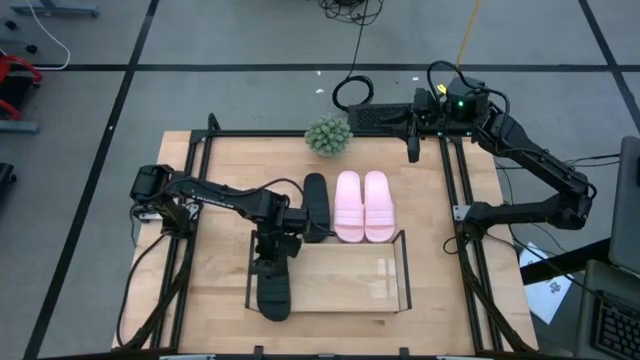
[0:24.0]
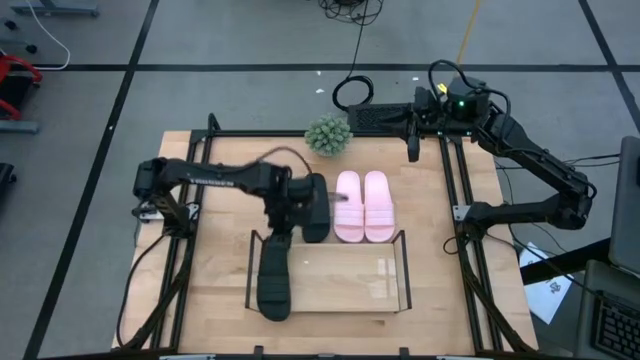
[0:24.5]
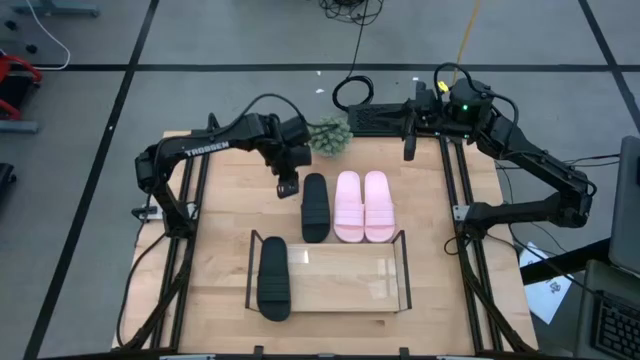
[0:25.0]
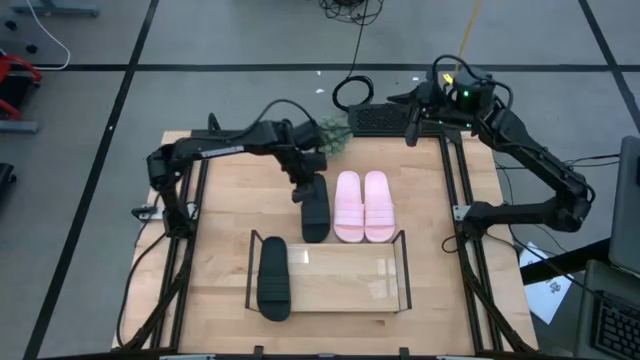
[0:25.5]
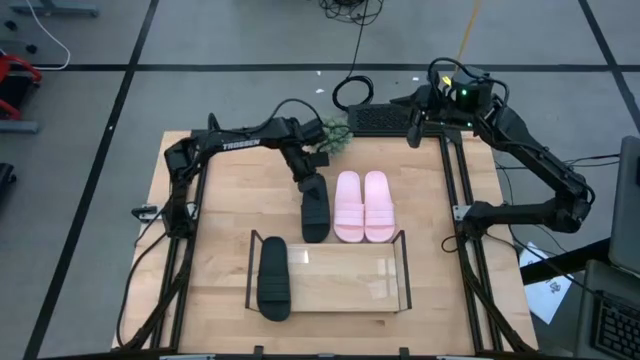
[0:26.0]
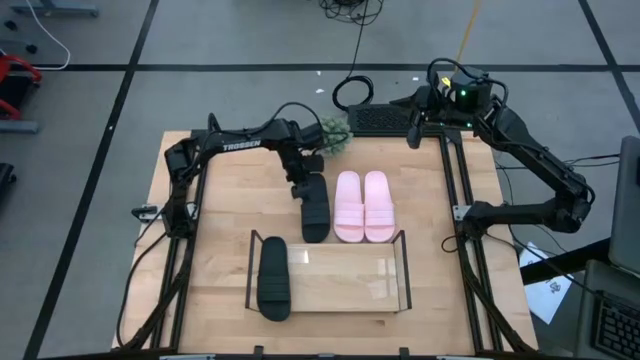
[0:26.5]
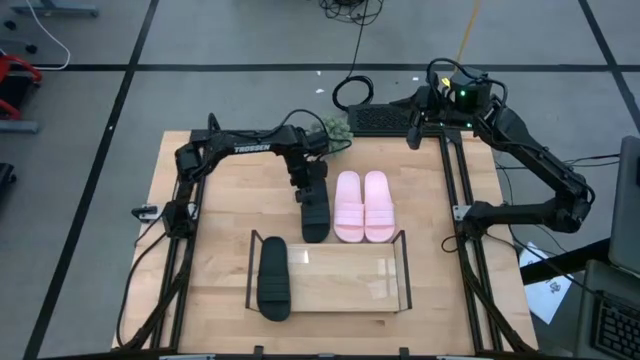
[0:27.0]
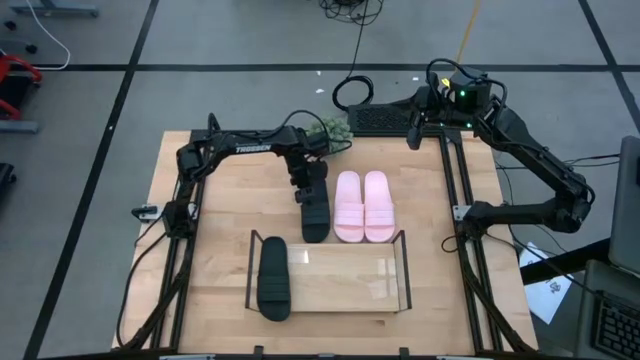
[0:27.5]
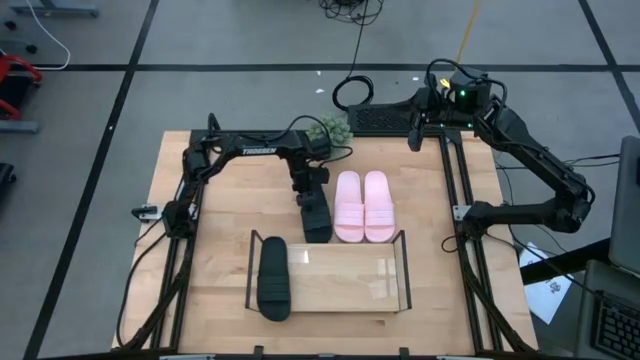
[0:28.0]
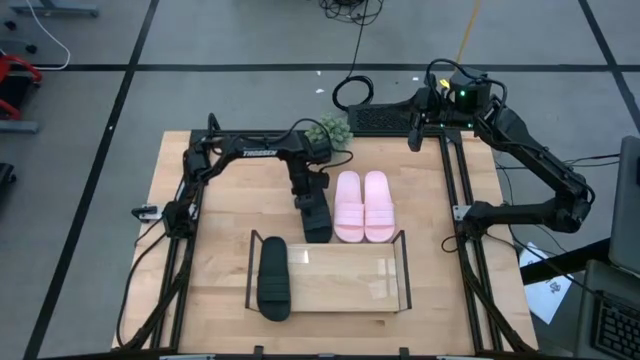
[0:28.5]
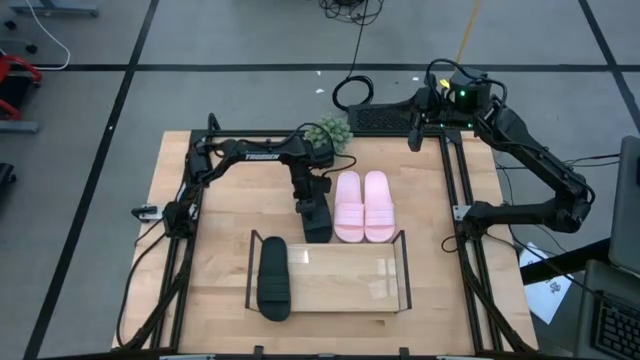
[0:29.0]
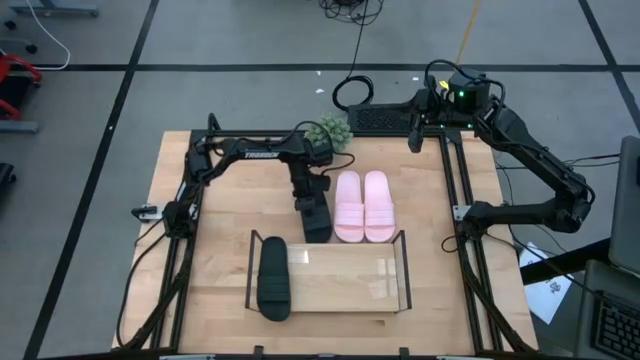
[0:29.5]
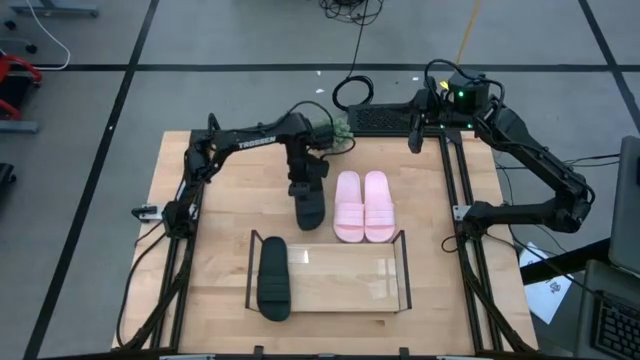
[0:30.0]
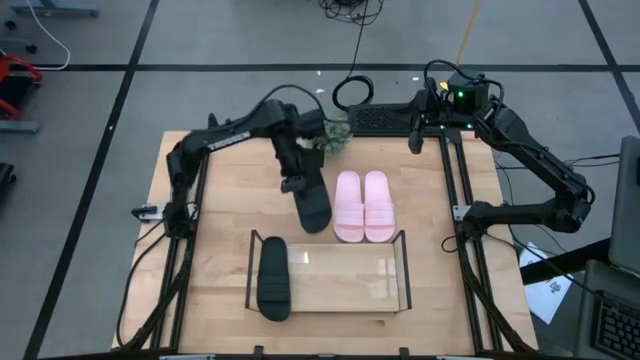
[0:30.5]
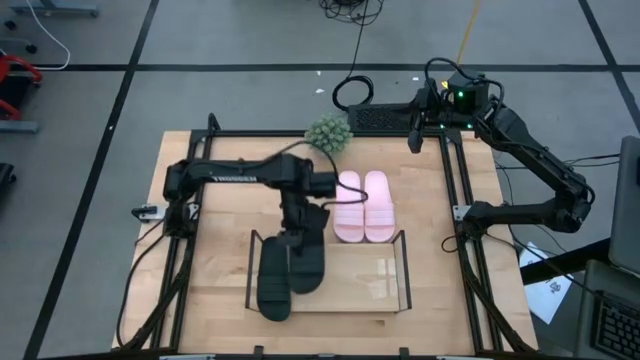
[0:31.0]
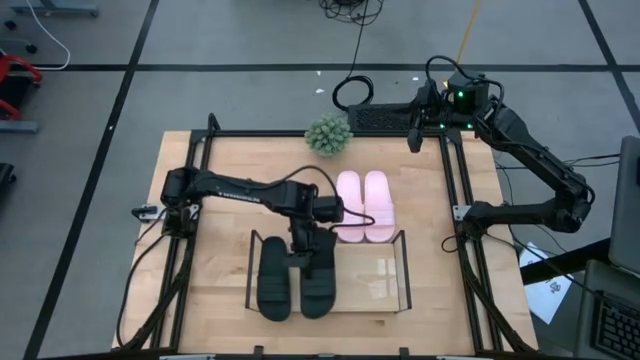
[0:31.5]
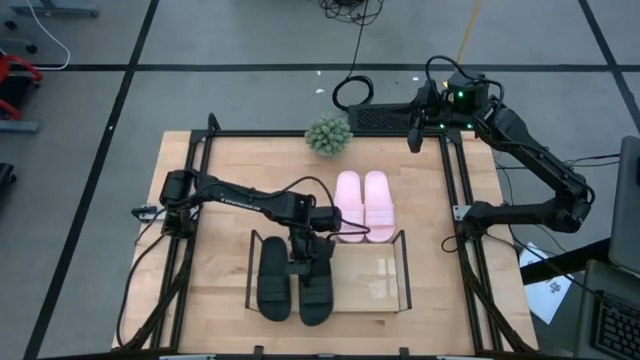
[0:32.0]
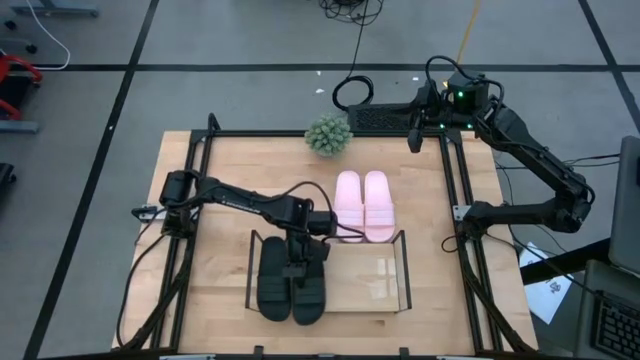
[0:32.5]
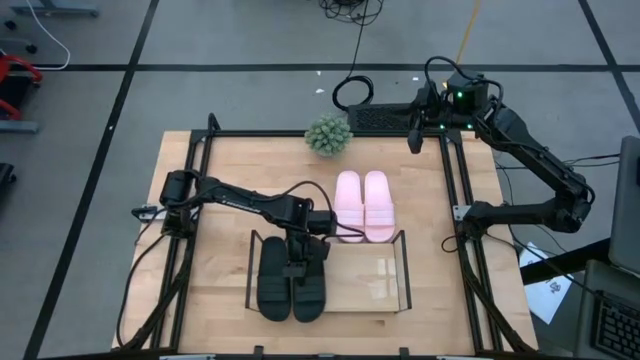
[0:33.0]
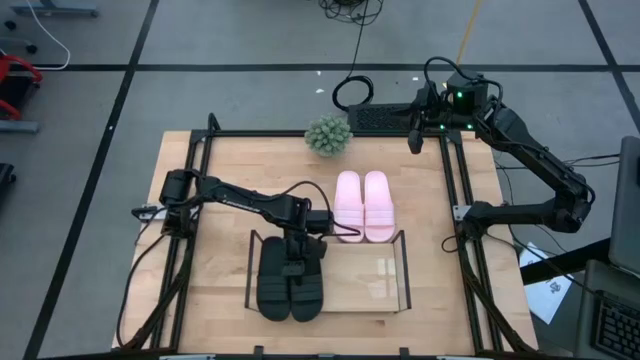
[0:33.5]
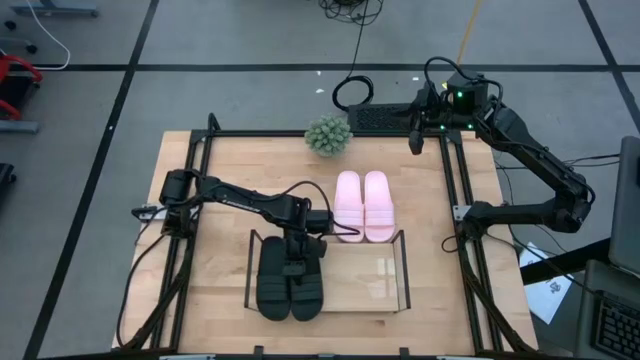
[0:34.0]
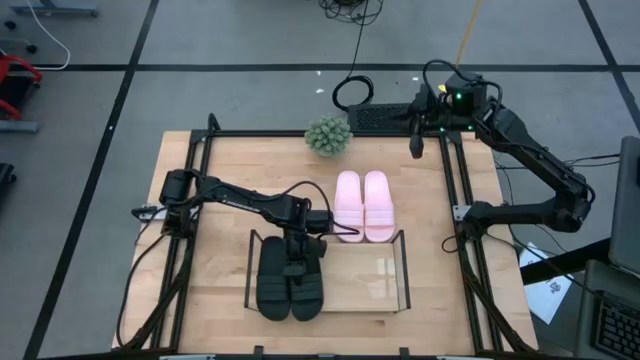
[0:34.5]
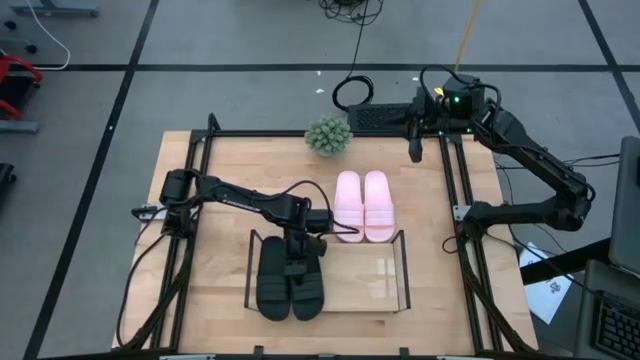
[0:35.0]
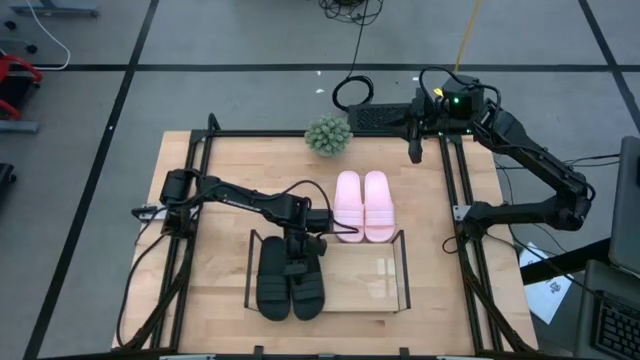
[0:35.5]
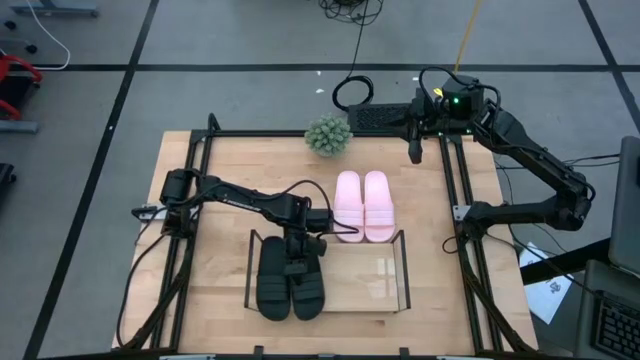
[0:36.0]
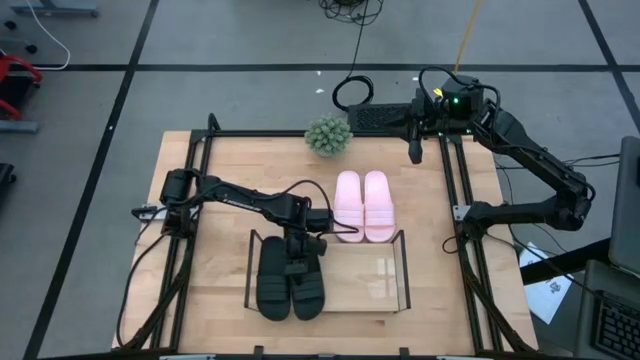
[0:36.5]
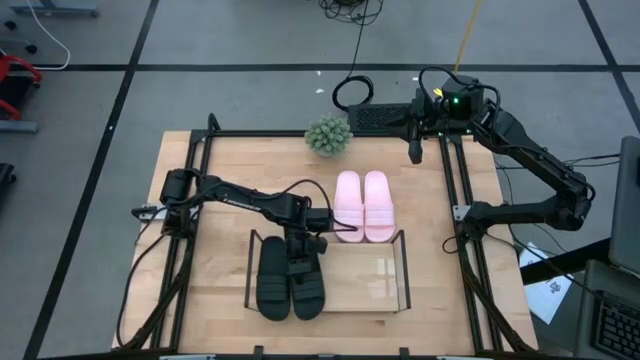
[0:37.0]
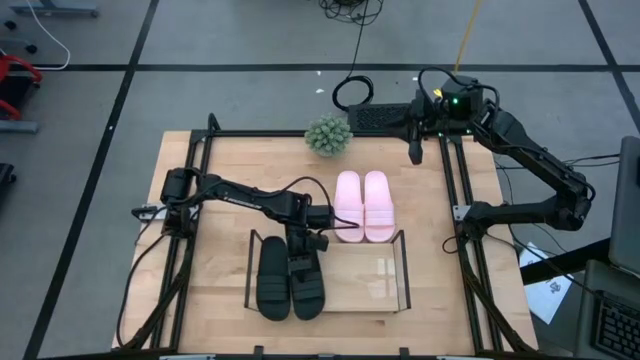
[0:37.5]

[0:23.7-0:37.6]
Task: Pick and place slides into the shelf
Put the black slipper on the shelf

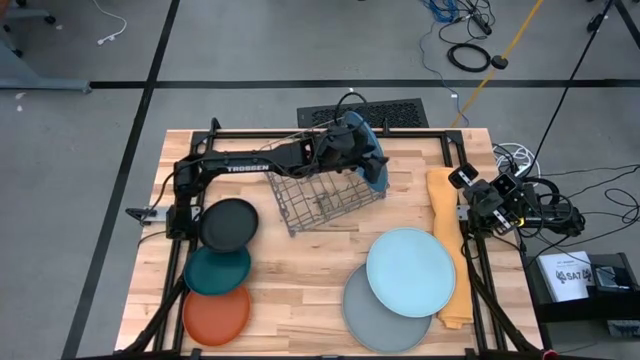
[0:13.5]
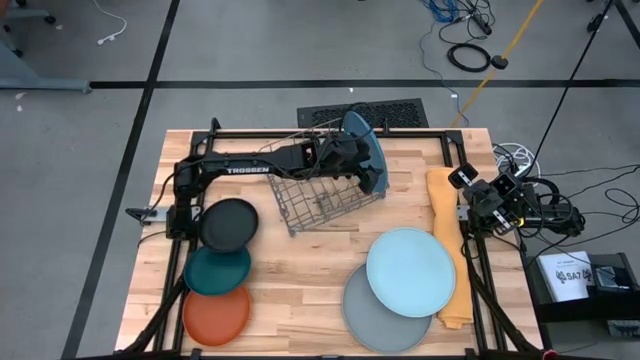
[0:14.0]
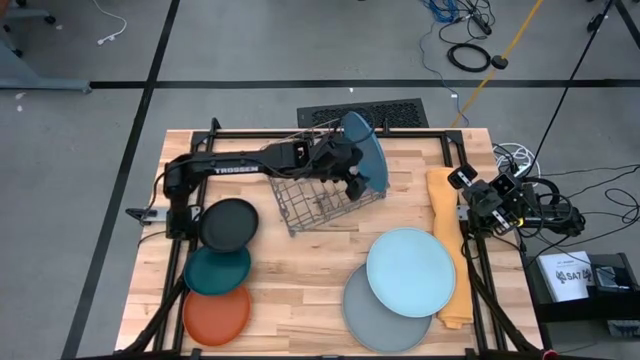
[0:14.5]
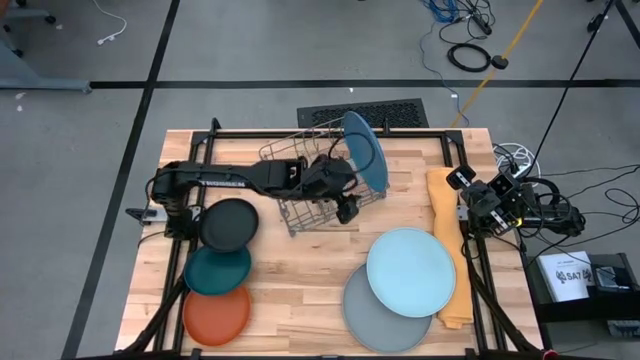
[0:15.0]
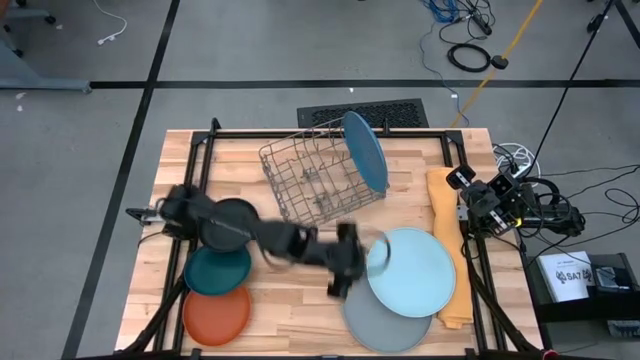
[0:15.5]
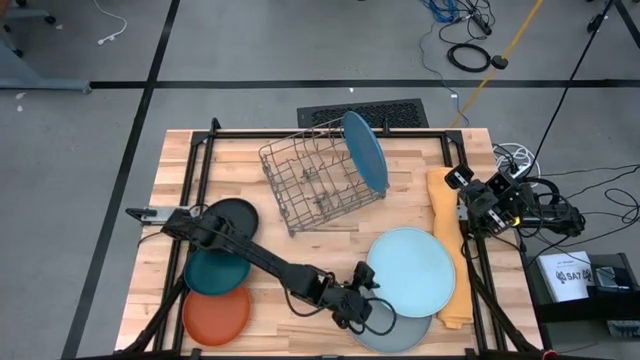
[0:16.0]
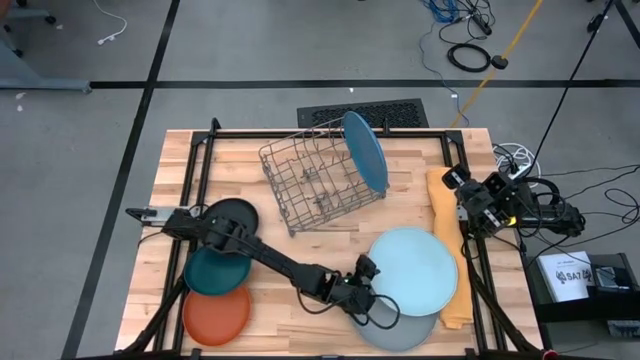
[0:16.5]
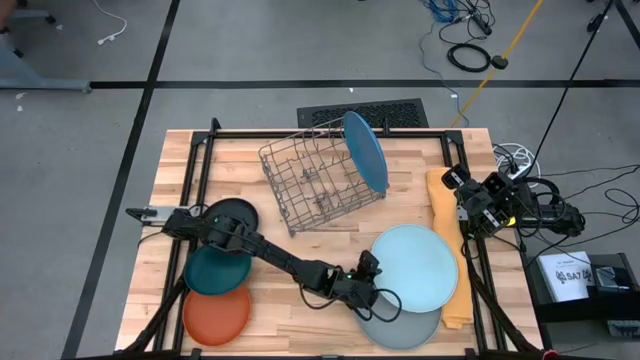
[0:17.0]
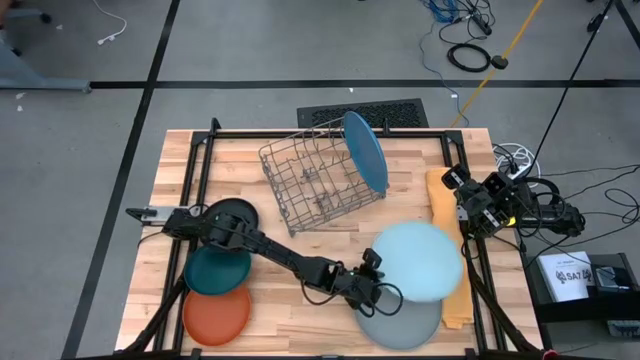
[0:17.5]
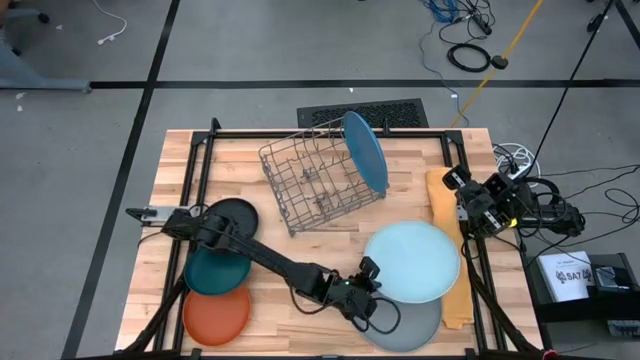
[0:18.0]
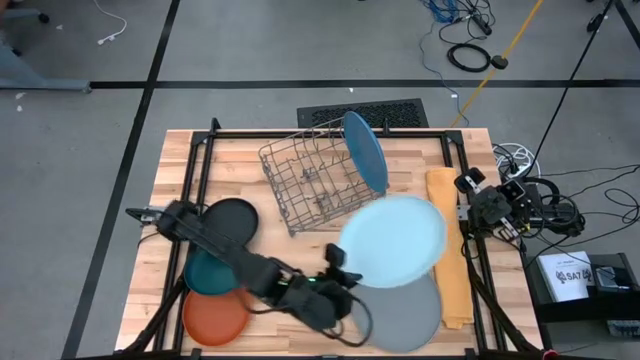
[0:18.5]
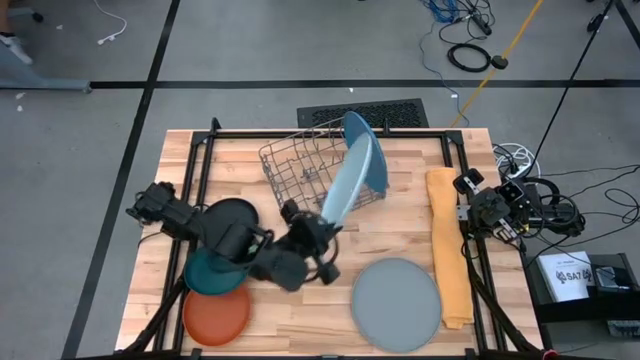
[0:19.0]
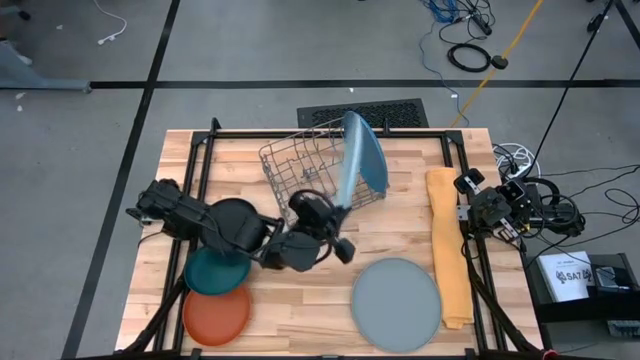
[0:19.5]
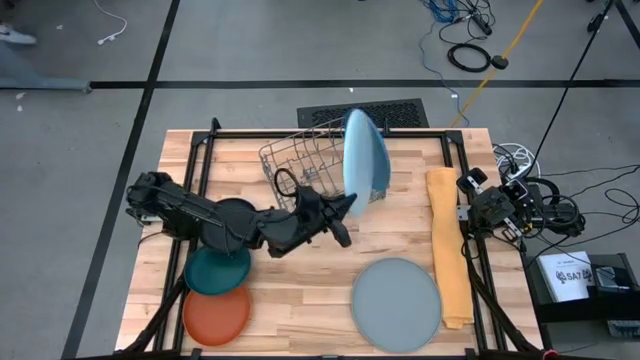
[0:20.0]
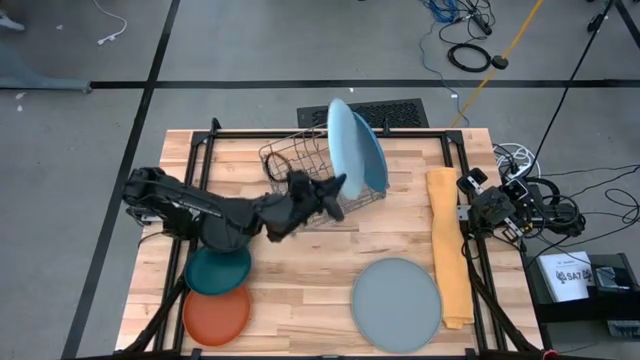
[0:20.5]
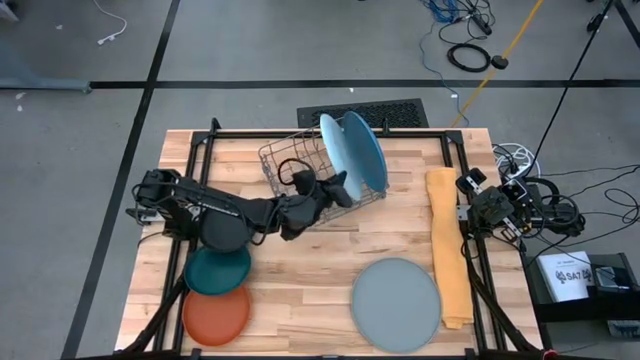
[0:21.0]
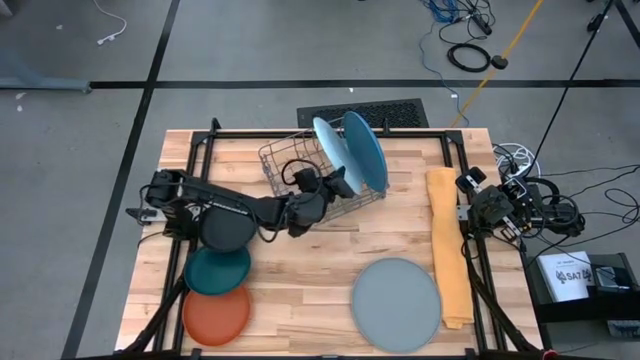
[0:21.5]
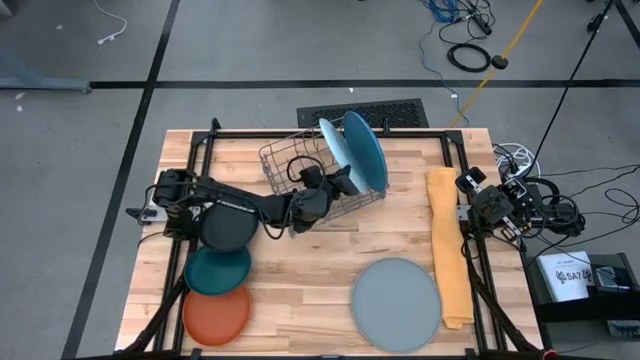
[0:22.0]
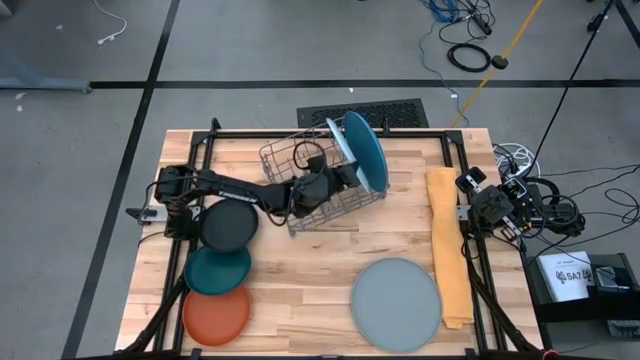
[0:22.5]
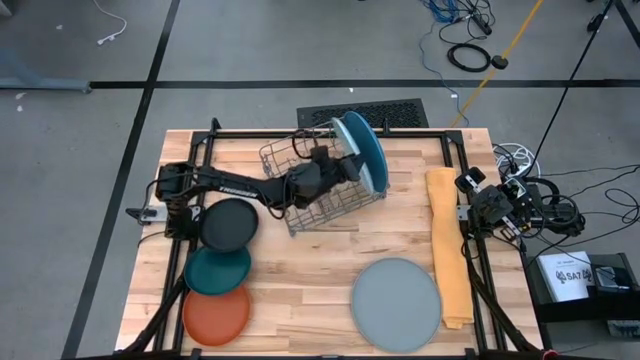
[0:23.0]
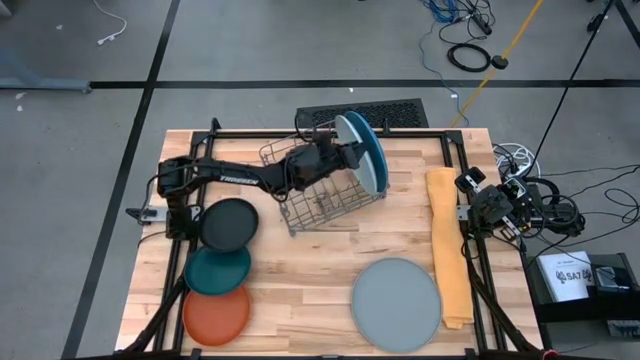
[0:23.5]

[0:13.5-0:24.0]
Task: Sort dishes
Put the light blue plate into the dish rack
